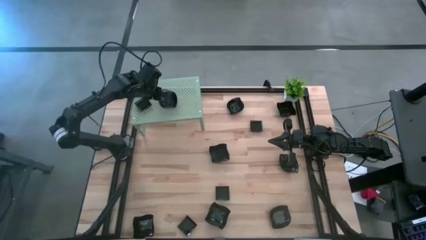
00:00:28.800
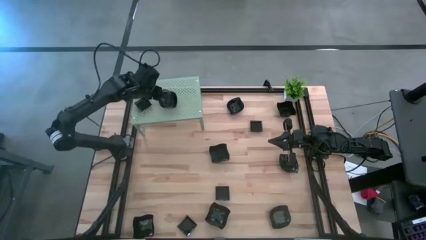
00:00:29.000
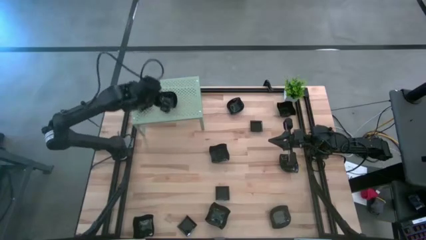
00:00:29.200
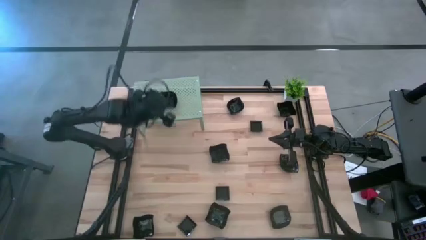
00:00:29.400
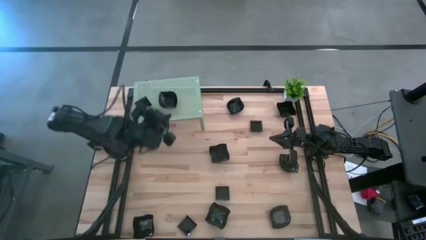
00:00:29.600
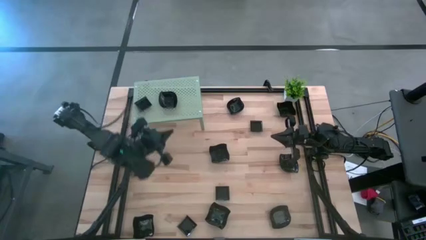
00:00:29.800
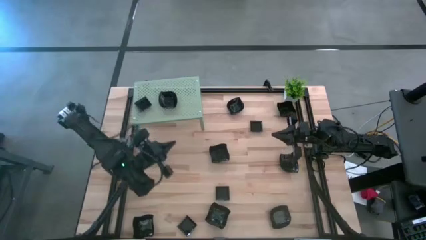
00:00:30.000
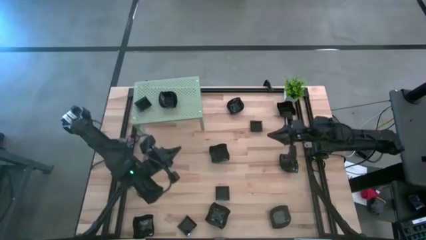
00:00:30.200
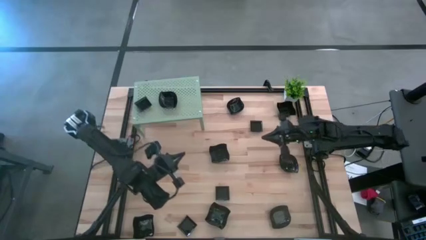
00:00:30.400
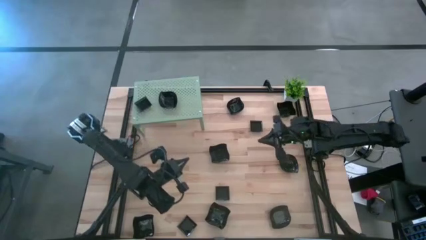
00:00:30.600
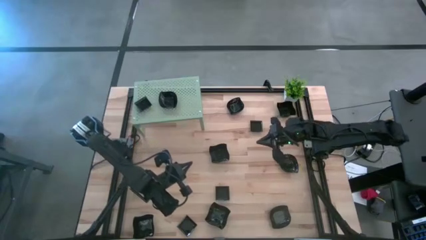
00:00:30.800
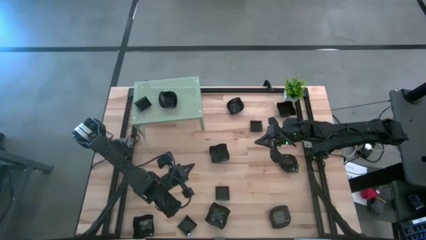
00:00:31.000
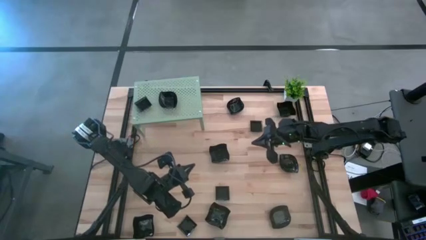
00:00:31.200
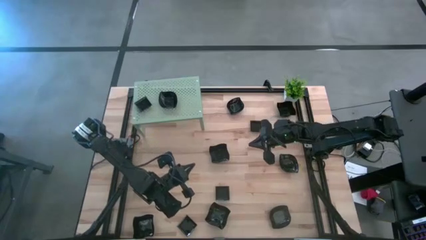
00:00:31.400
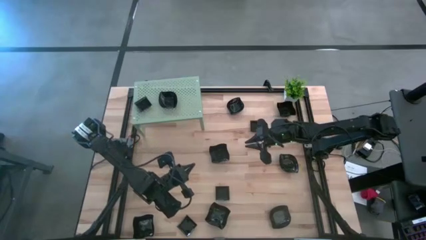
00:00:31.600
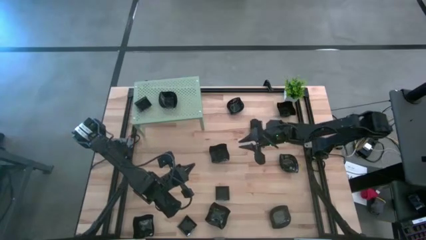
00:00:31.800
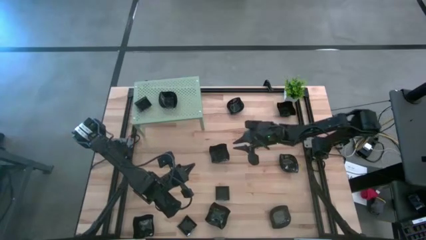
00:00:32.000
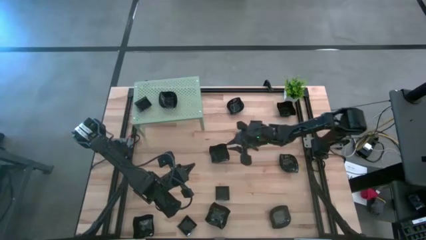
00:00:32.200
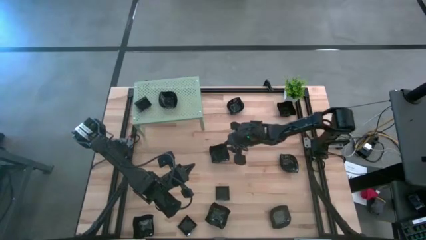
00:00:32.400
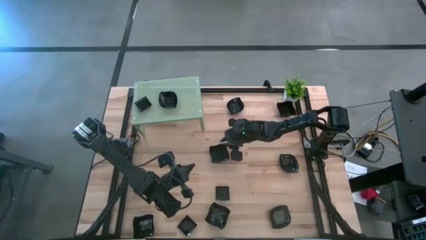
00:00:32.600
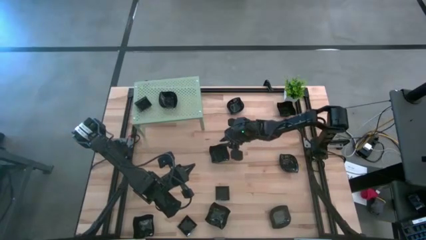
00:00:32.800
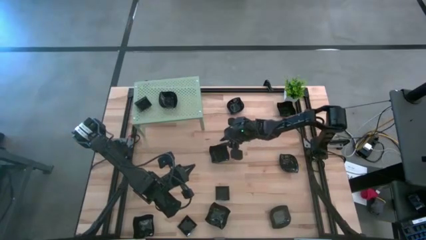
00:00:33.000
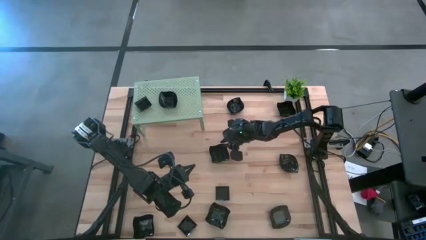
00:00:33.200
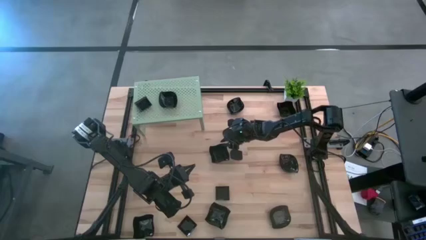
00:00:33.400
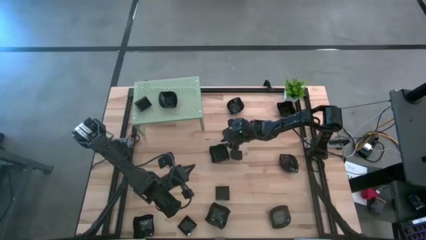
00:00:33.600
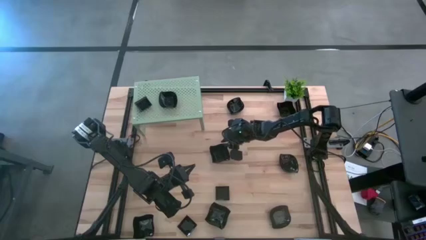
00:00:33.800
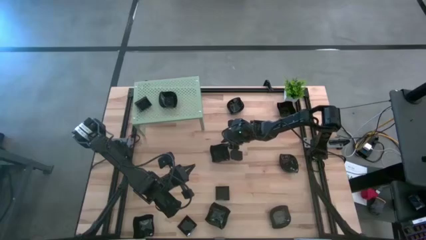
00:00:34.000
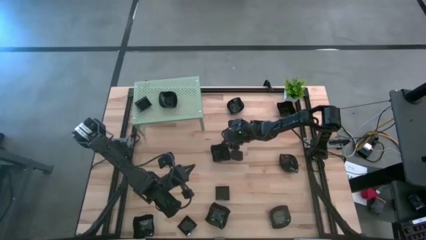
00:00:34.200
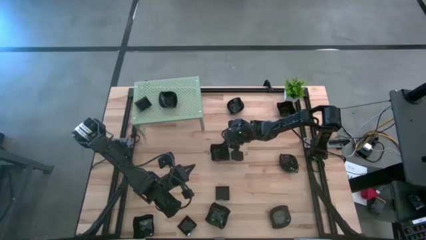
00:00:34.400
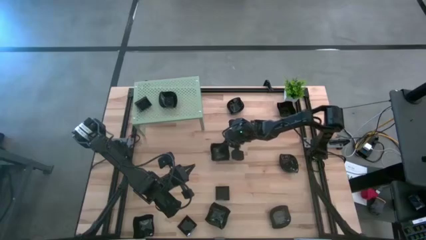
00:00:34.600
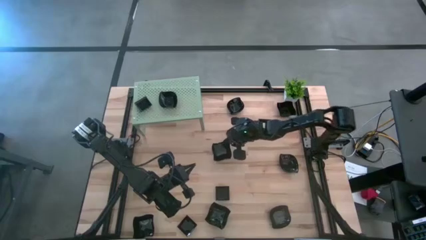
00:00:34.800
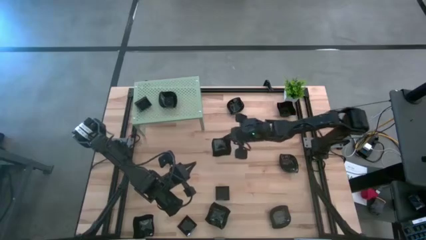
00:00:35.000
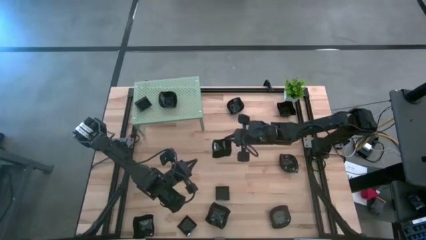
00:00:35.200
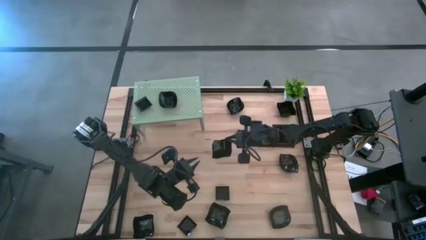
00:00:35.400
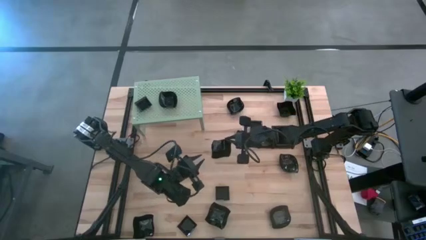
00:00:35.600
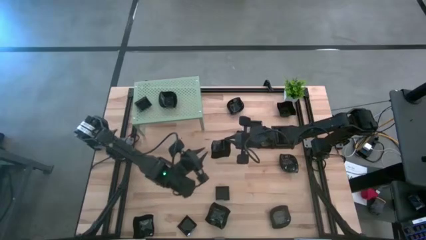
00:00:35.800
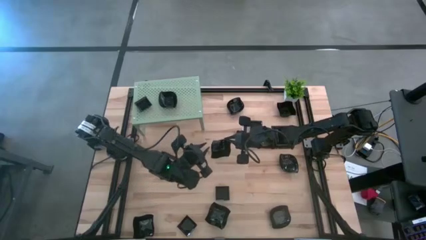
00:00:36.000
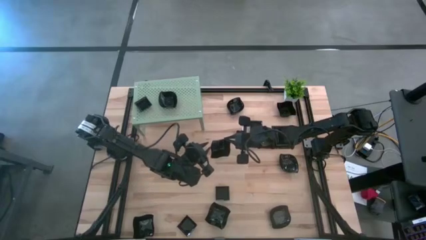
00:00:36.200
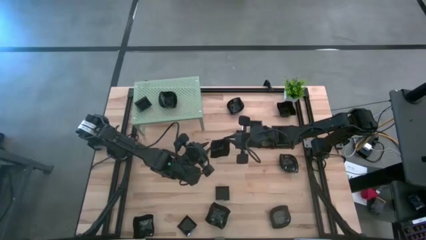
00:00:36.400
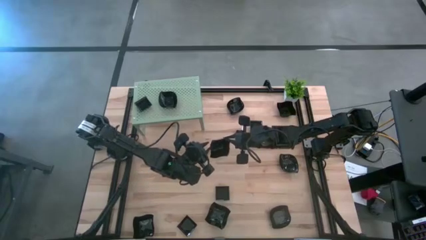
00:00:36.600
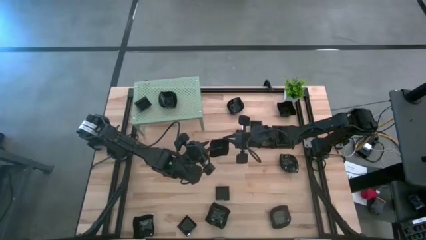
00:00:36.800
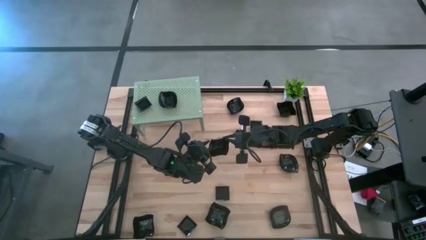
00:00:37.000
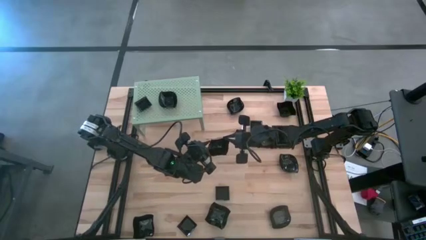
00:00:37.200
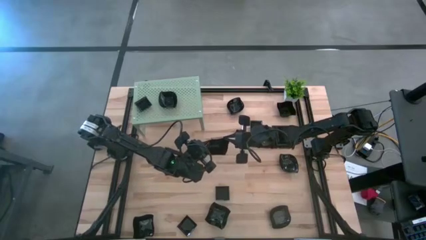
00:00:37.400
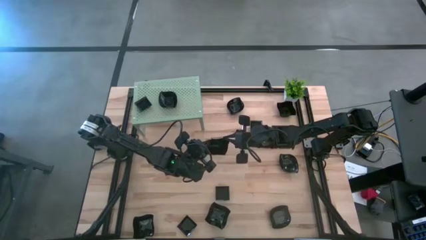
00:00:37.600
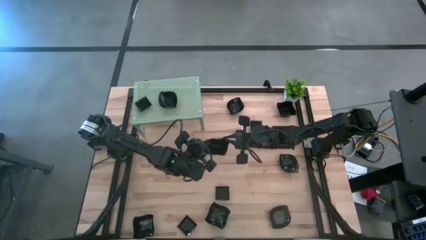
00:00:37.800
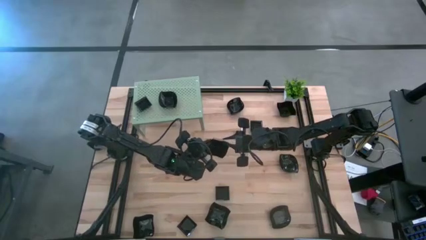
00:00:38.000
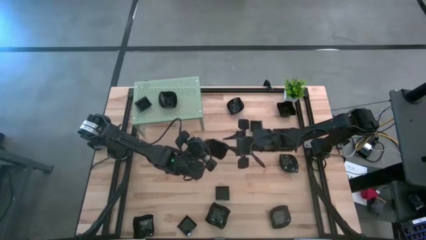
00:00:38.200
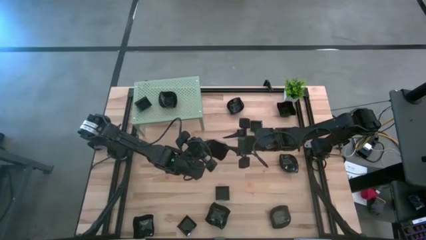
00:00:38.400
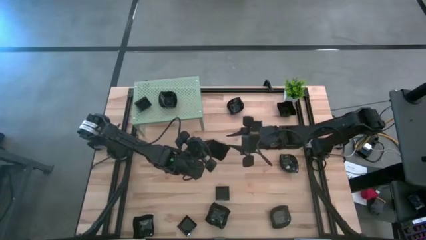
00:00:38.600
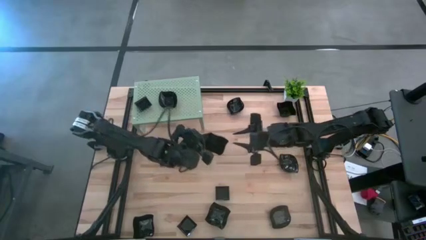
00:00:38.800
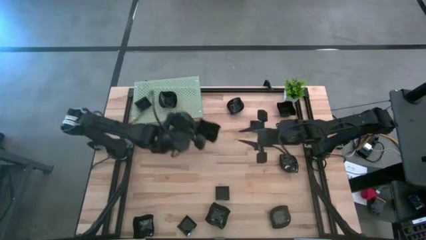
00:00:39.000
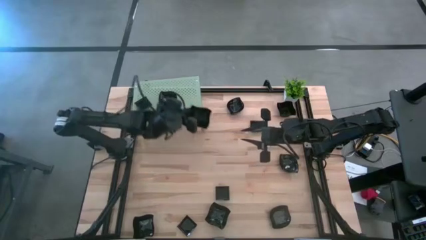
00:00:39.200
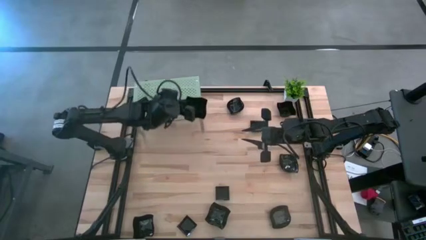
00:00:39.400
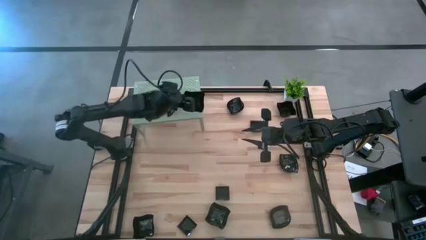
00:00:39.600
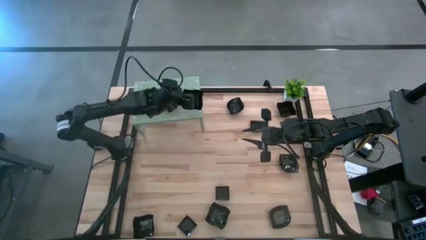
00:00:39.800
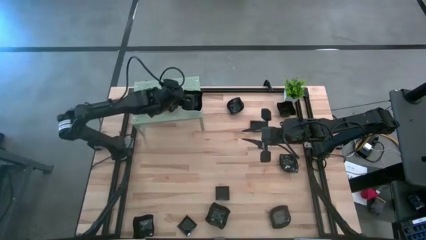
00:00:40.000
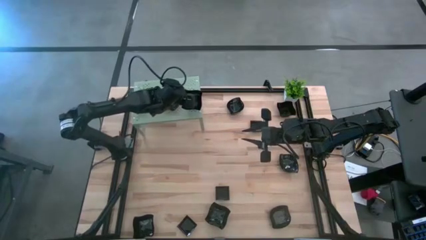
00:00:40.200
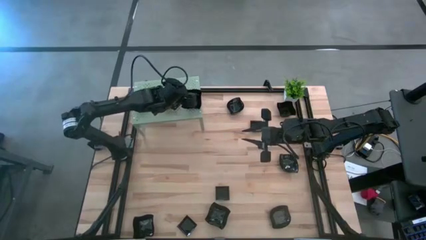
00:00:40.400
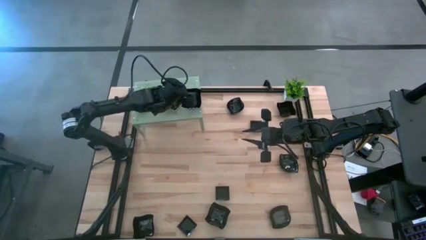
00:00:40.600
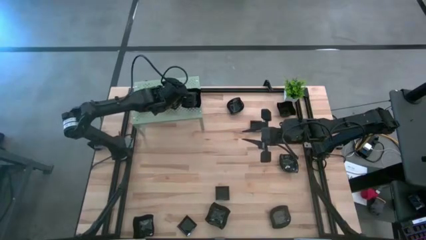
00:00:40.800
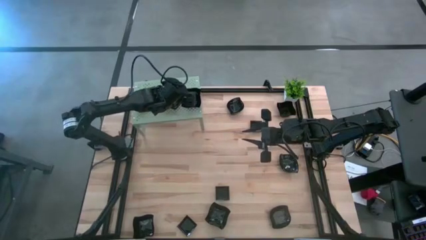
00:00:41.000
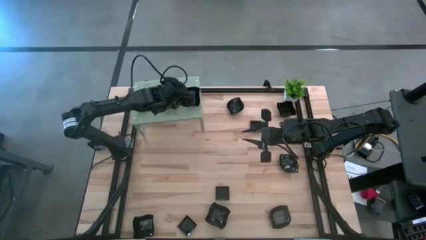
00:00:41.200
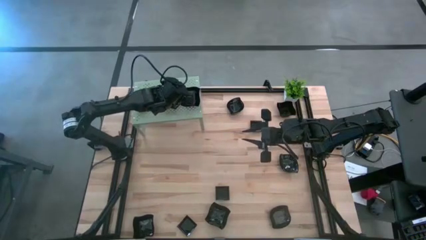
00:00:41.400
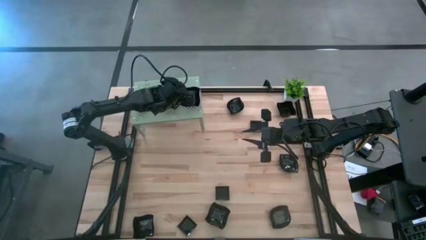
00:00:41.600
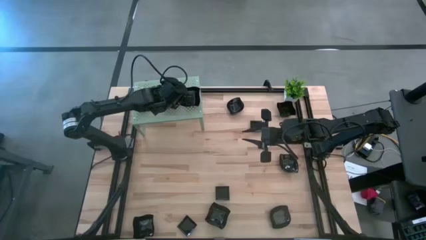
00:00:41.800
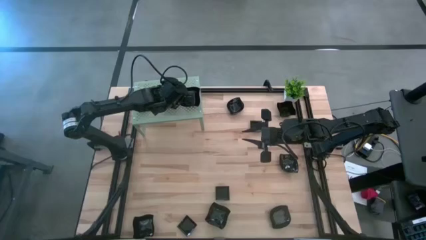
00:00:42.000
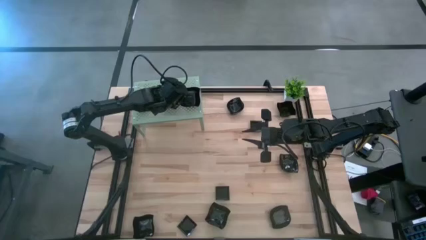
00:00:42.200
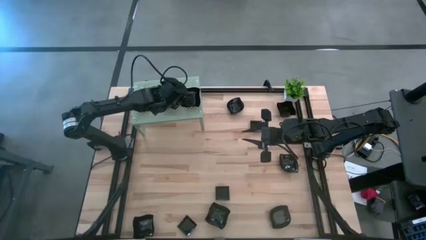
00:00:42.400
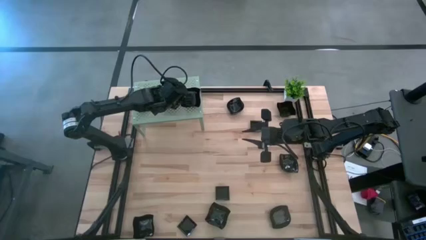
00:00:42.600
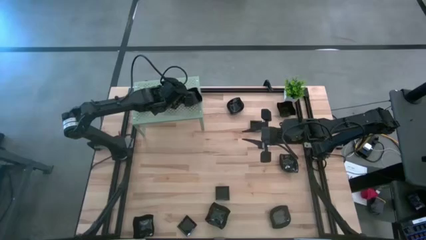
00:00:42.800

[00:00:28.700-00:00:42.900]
Task: Pick & Place Mini shaped plates
Put the black wave square shaped plate on the shelf
